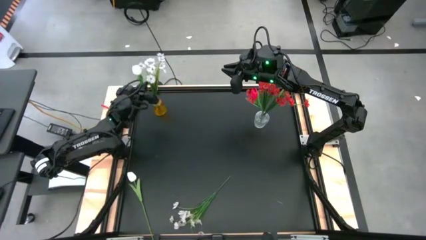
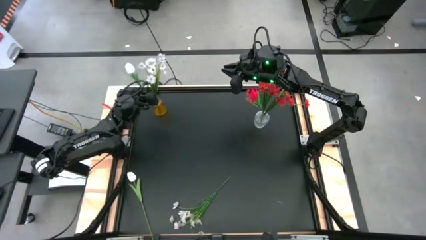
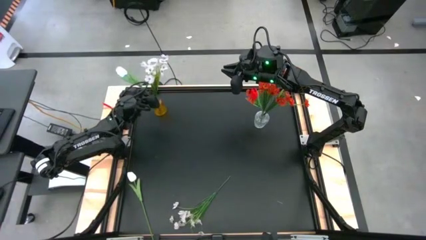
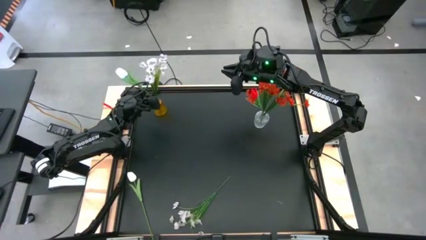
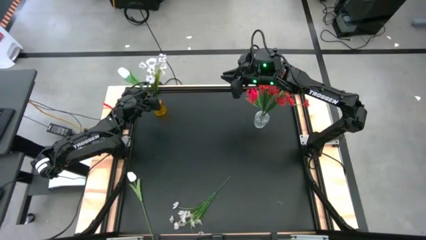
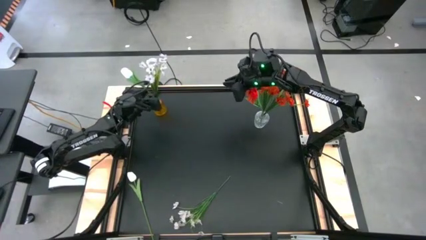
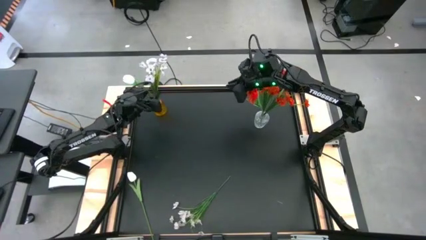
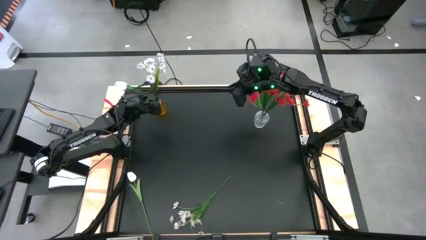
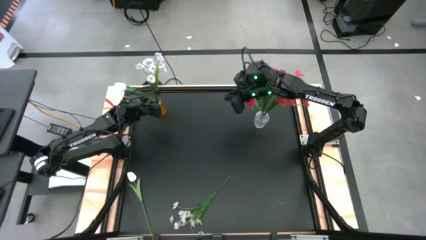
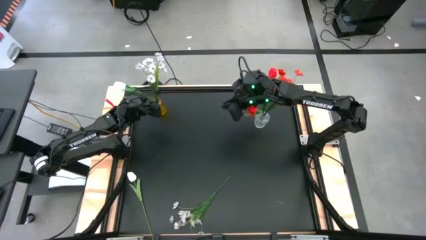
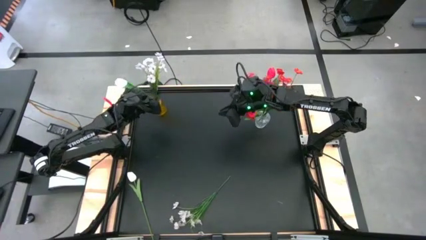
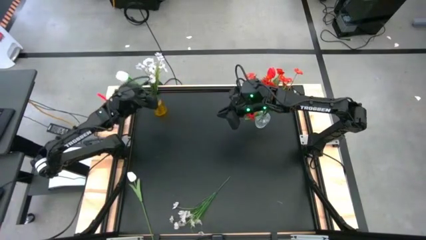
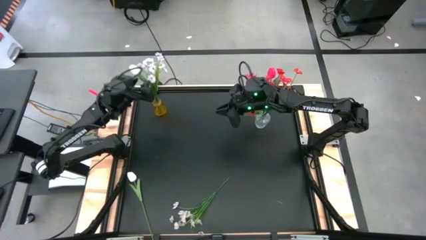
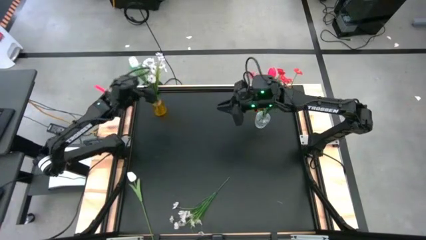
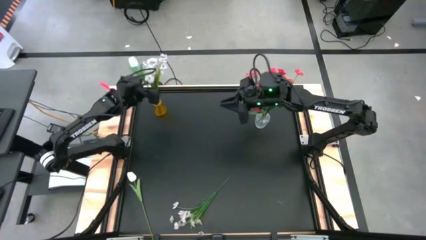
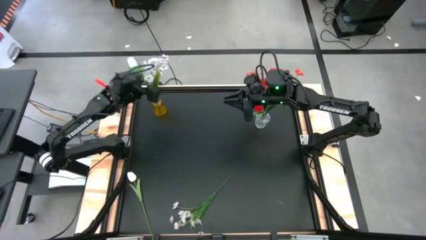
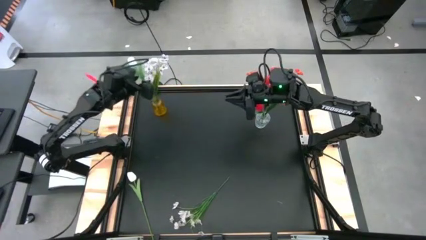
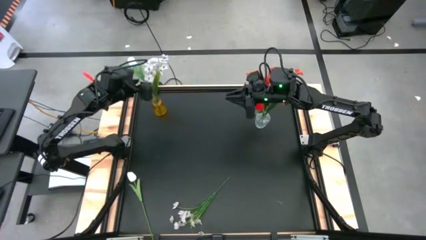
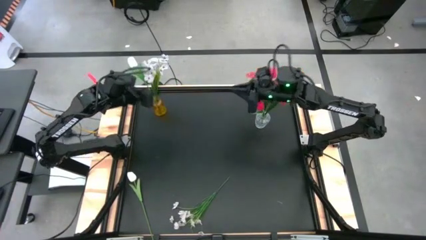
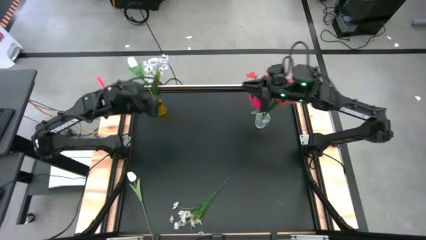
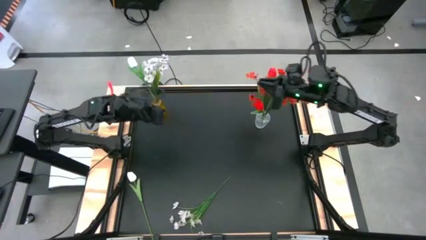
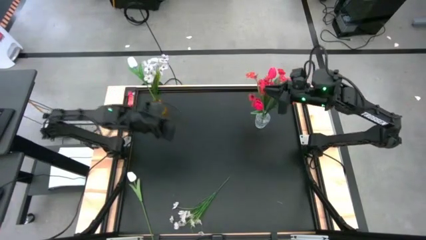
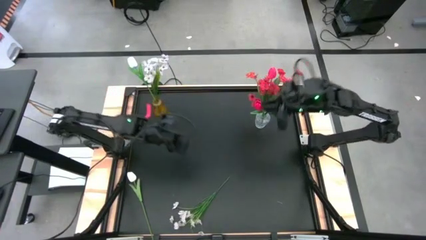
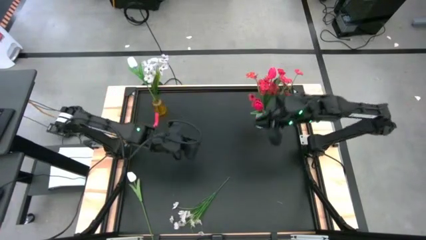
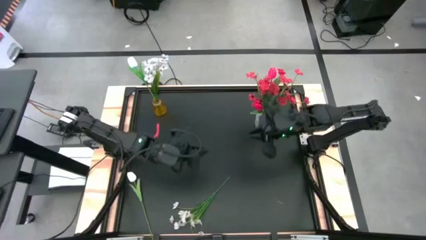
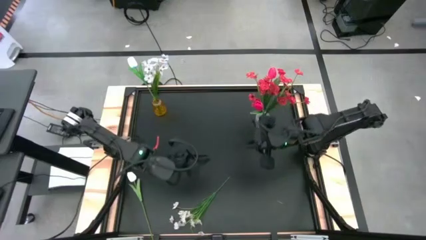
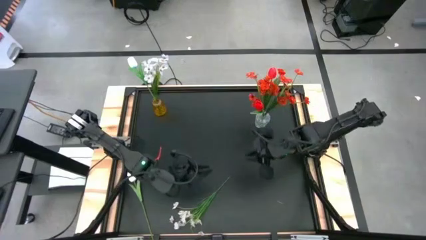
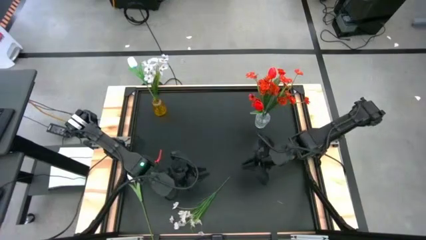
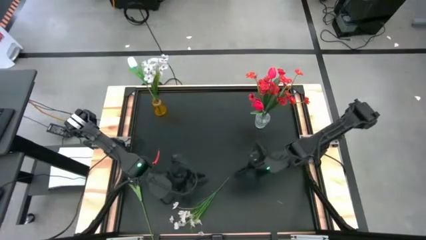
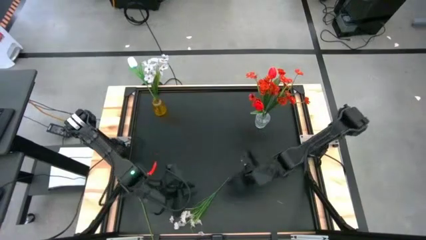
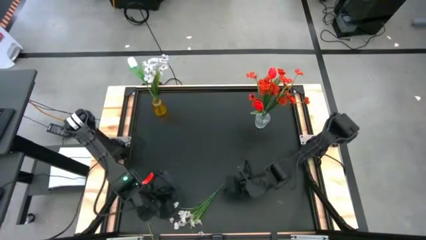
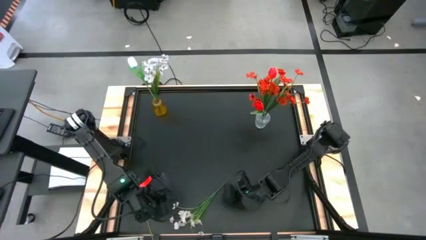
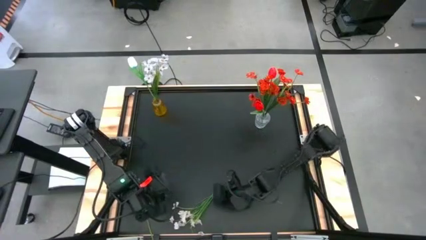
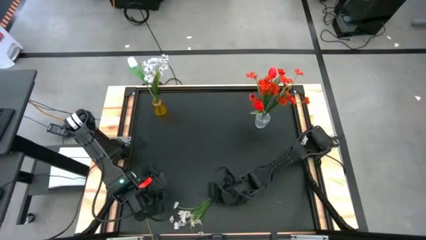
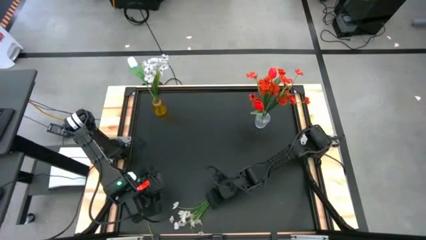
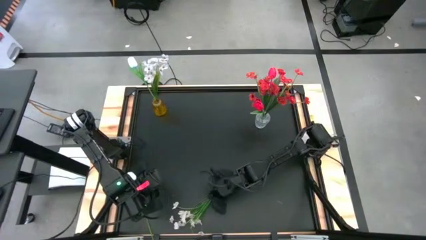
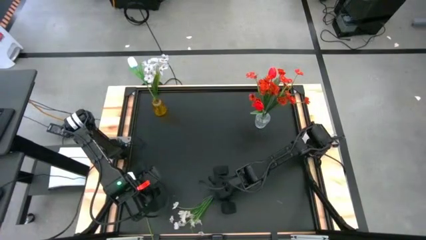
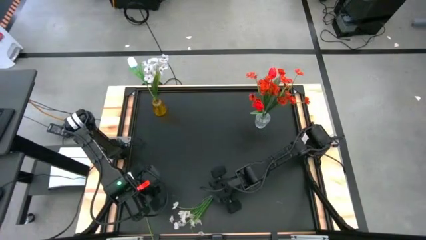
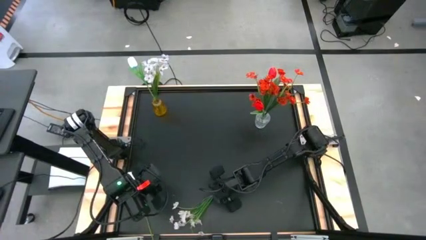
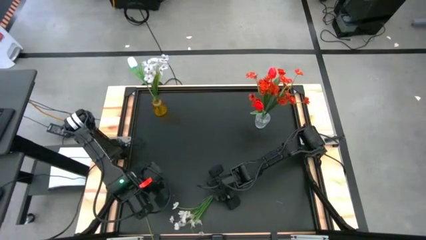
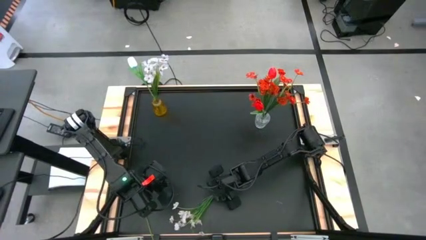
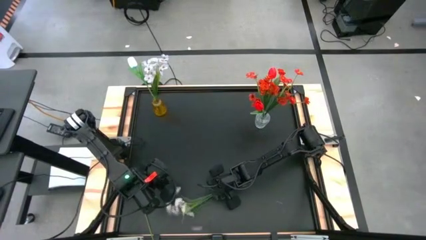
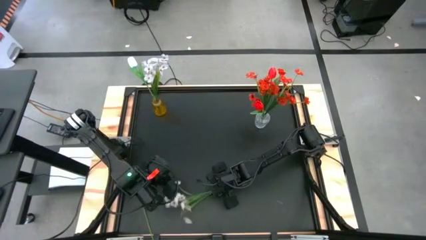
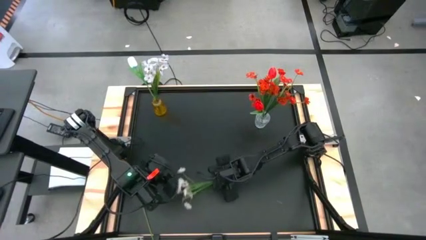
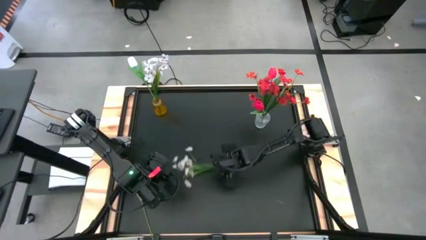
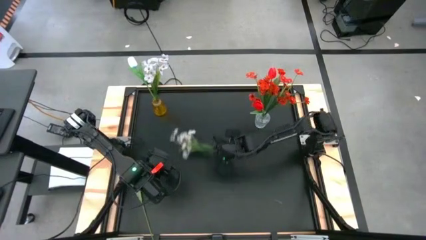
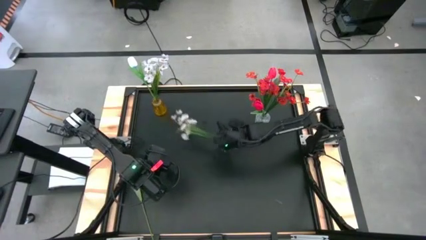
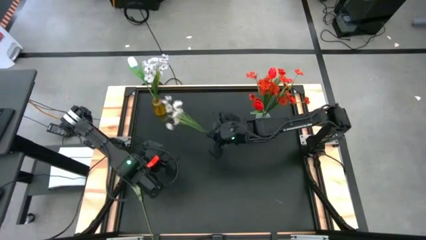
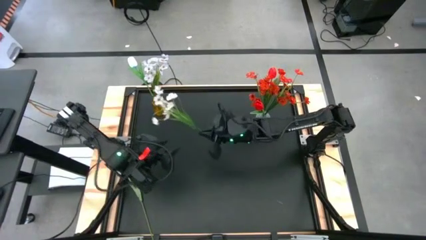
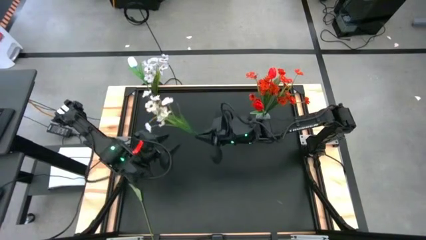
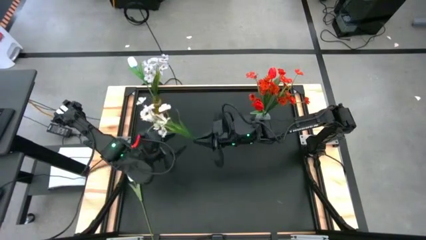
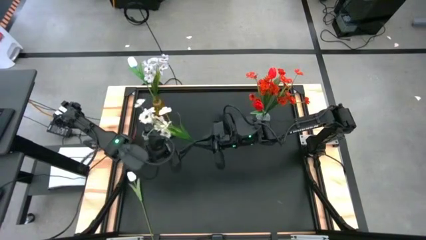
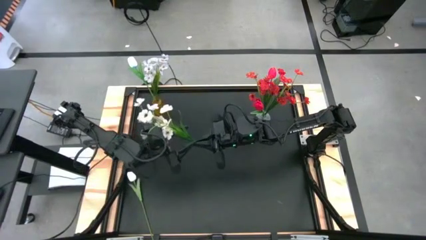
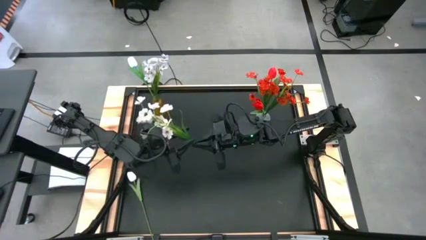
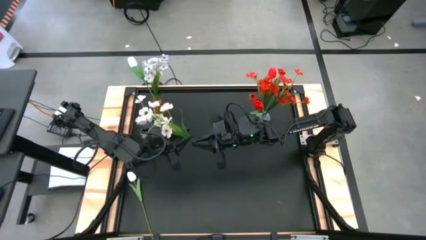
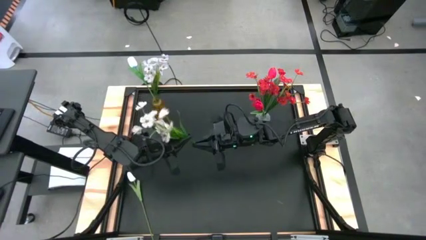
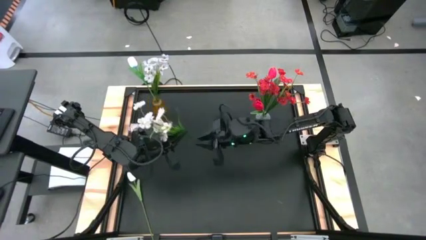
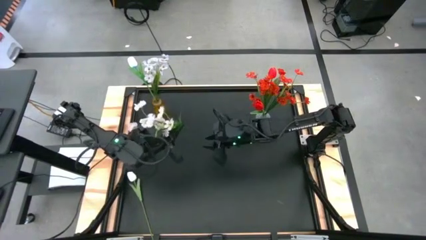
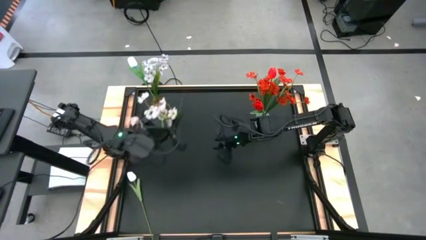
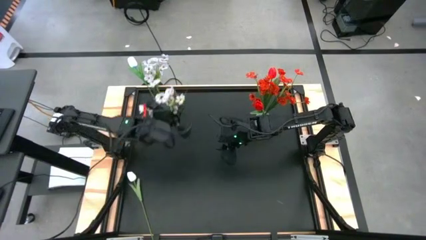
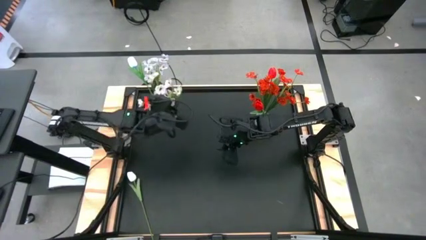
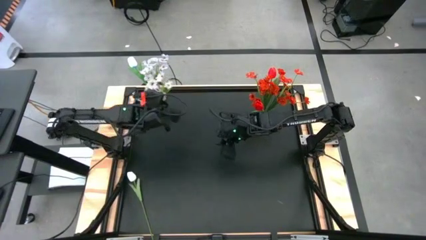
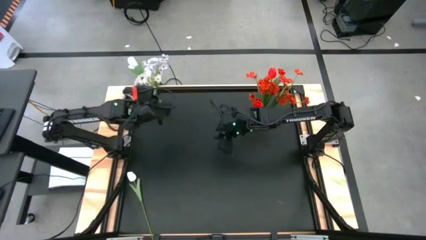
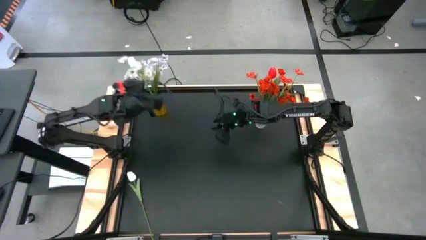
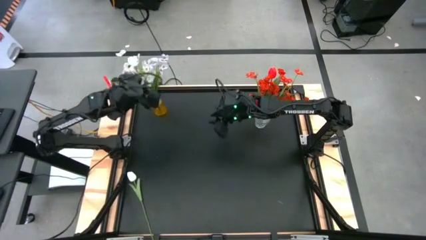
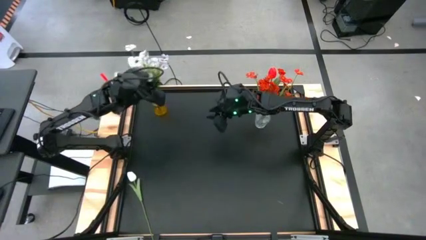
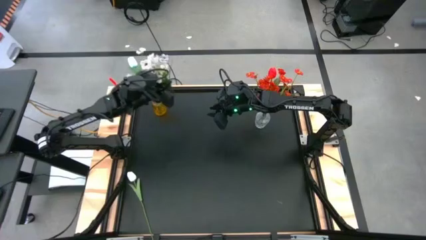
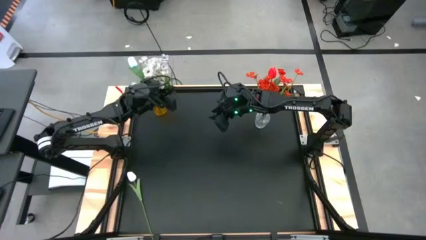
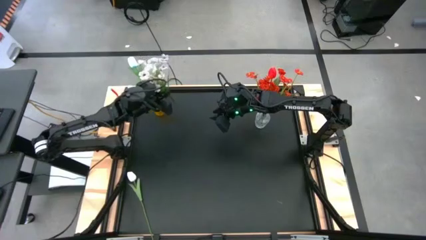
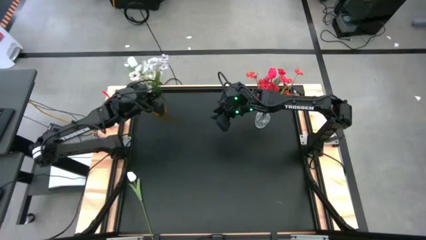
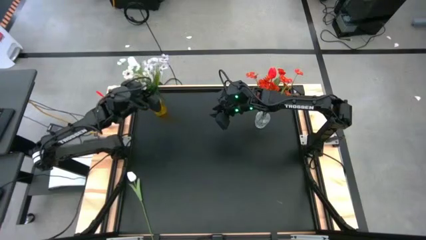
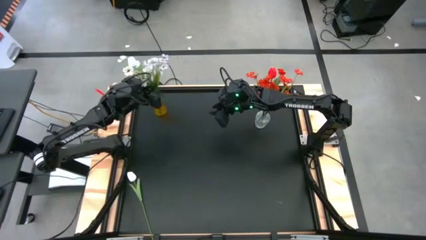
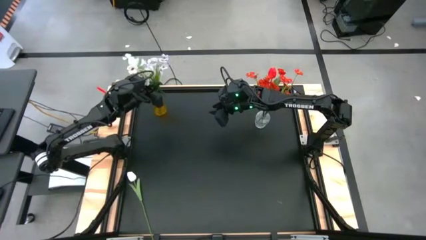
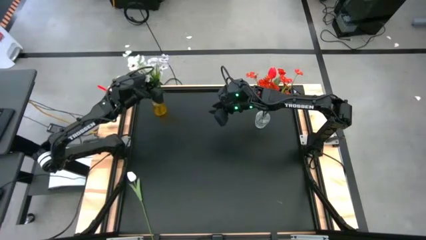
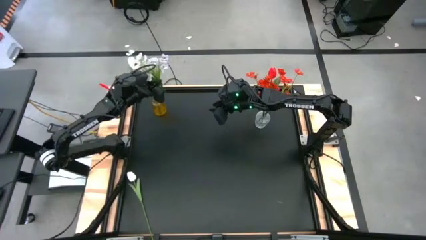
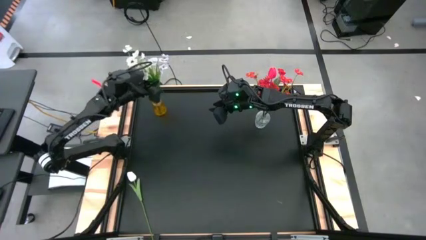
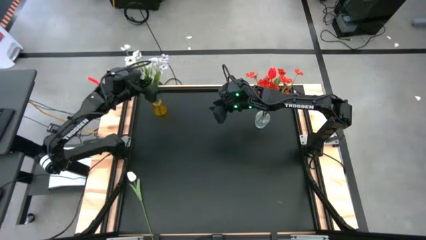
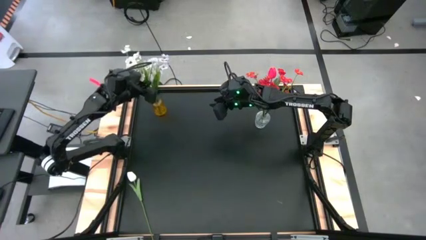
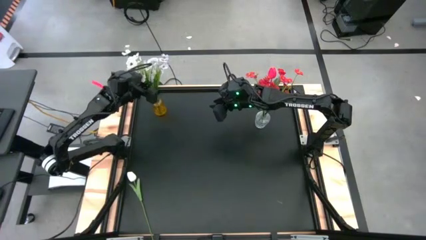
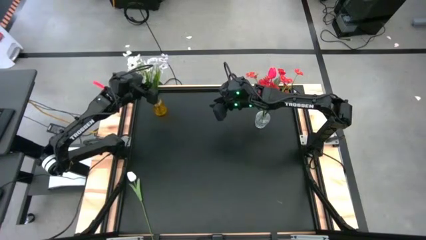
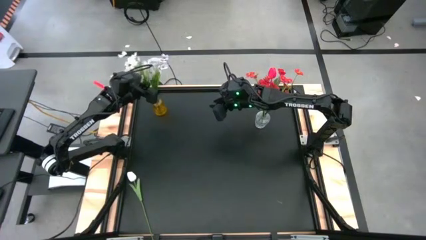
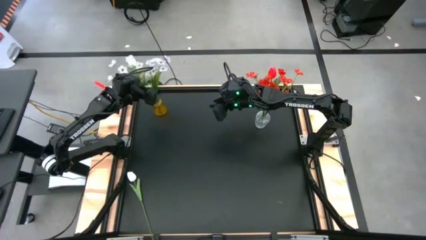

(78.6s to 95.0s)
Task: Sort flowers into vase by color
Put the white flower into the yellow vase
